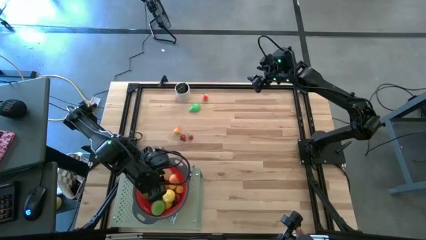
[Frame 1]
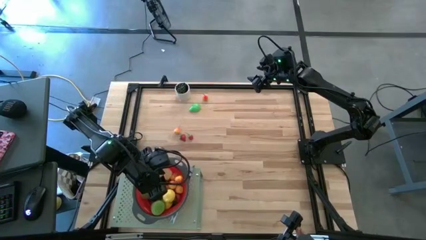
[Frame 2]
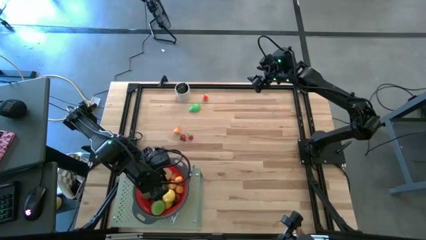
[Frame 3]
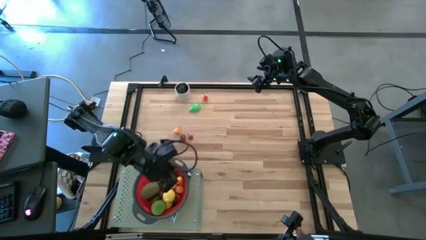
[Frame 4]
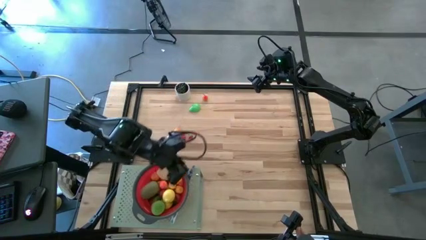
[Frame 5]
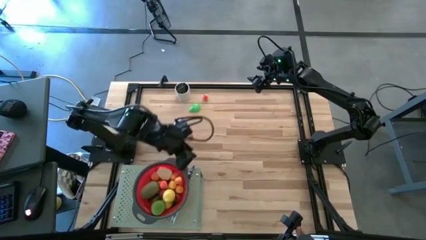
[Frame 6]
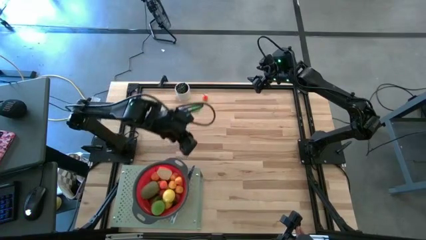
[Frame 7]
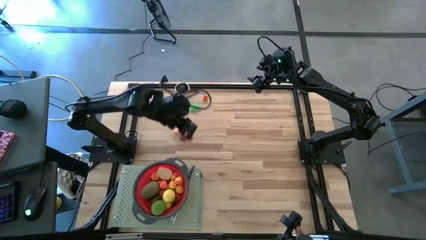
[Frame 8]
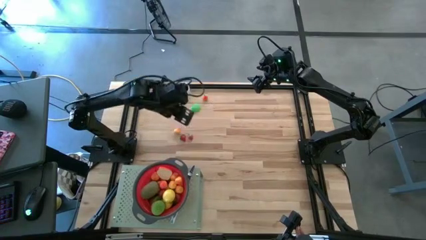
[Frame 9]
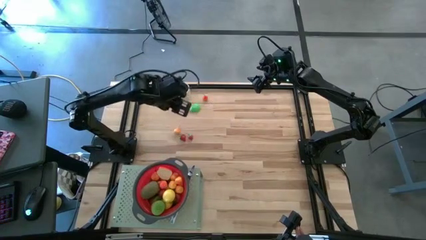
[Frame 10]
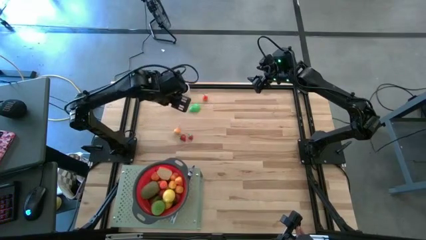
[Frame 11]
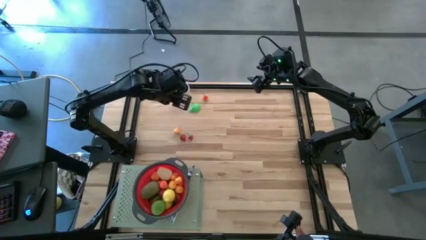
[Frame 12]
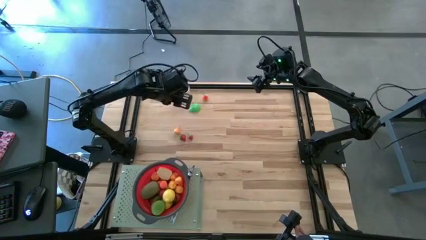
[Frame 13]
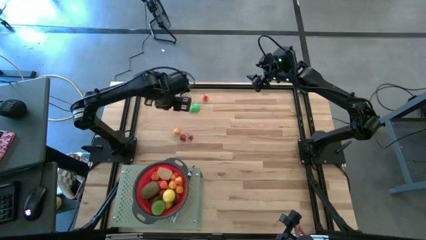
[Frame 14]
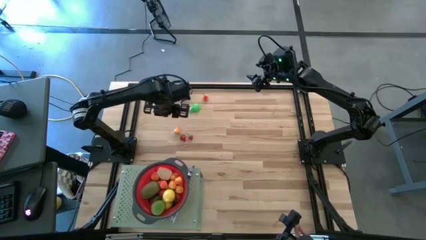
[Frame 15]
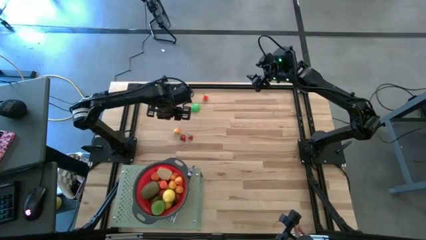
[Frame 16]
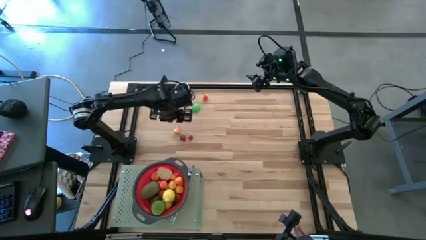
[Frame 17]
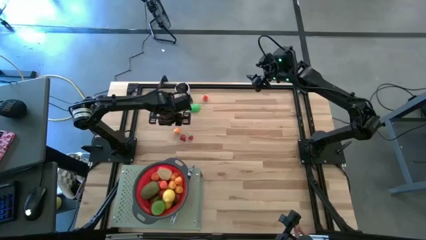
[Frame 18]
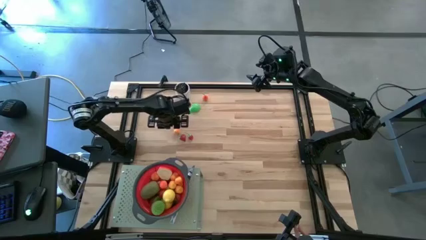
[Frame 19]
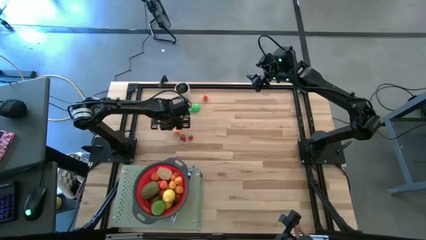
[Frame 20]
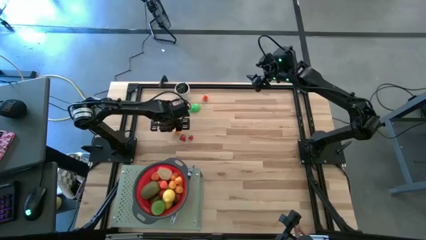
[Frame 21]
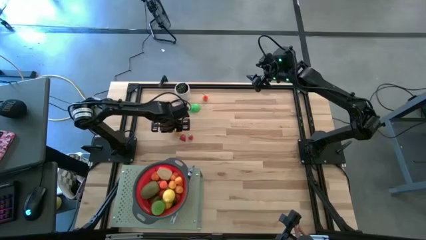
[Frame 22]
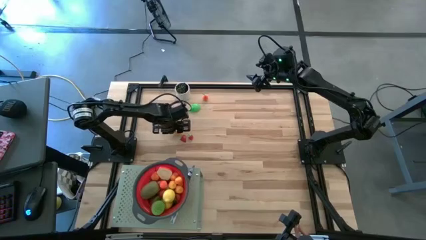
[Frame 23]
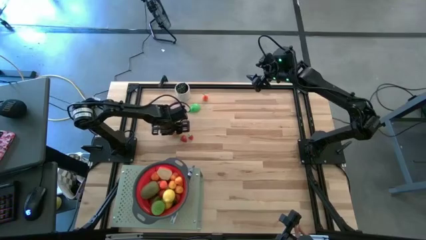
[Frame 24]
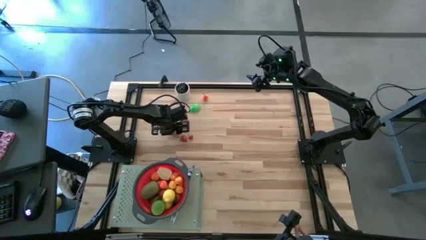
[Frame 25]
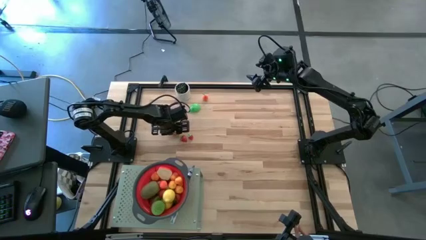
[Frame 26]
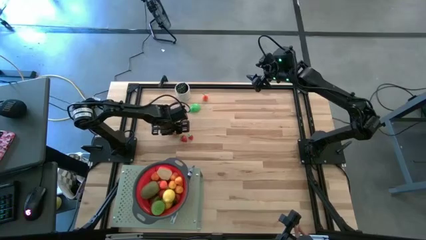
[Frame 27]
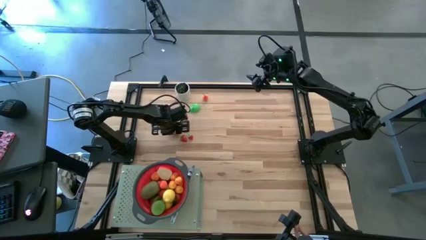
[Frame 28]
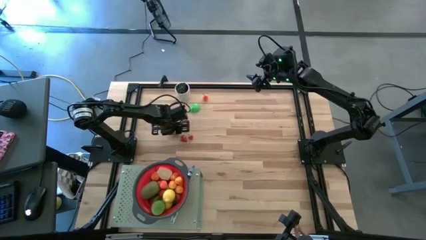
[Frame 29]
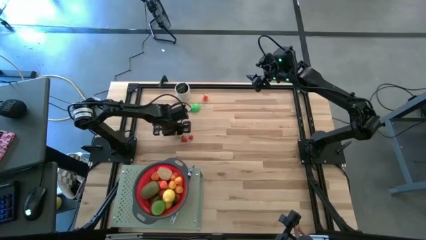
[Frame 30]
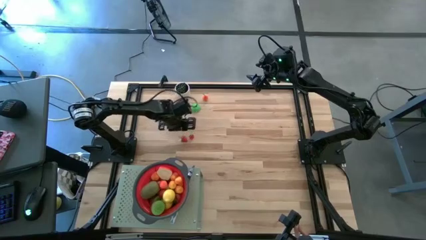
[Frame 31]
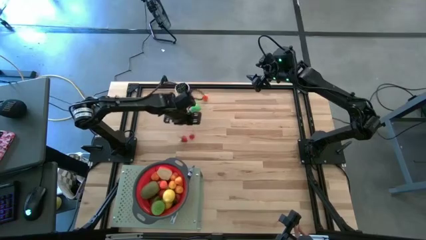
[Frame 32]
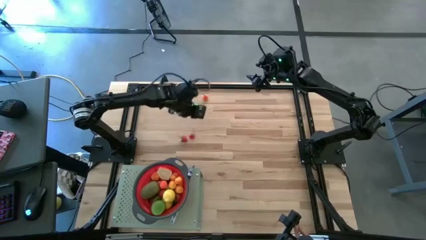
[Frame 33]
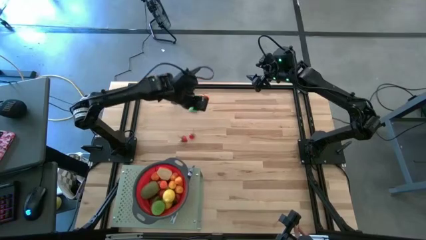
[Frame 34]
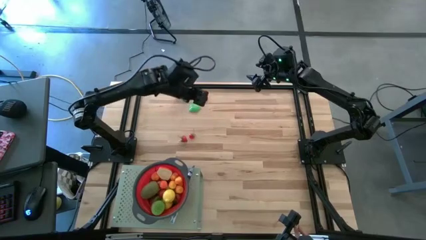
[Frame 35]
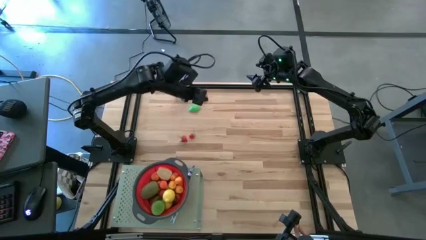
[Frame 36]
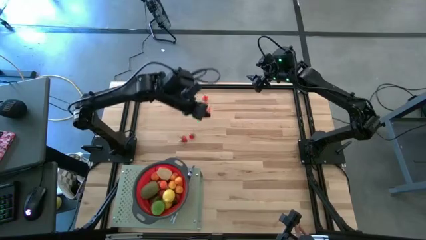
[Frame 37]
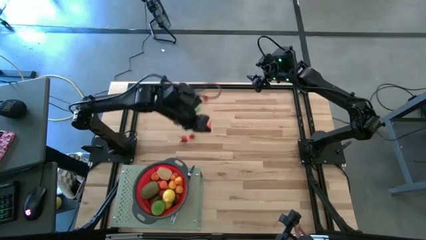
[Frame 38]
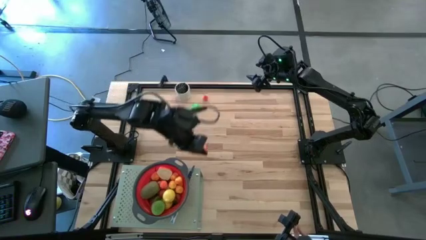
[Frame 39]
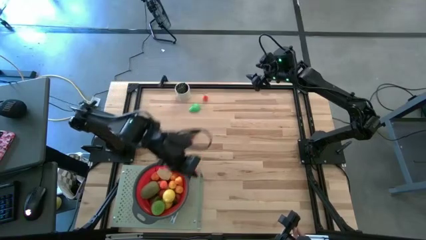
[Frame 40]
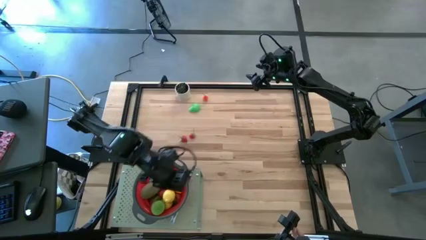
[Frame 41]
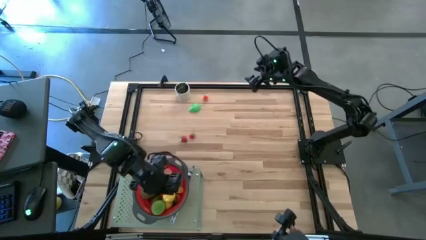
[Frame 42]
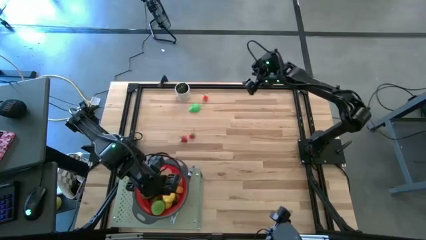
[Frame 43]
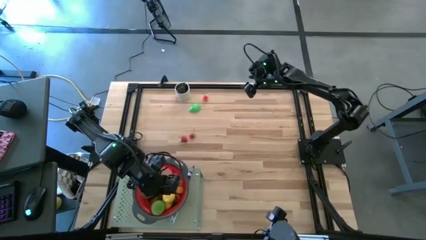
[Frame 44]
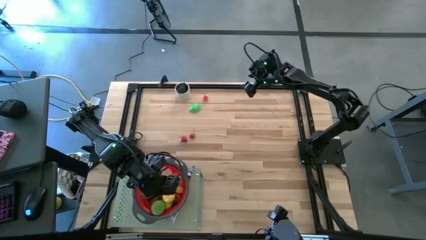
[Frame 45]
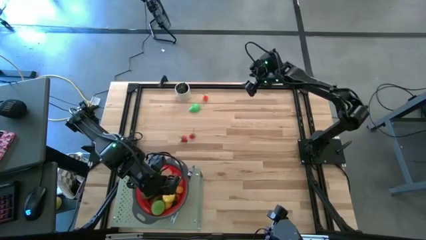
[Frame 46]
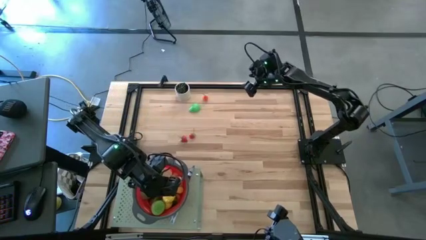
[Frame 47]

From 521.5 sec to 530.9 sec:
Task: Pick & Place Fruit
Put the pear into the red strainer bowl on the shelf

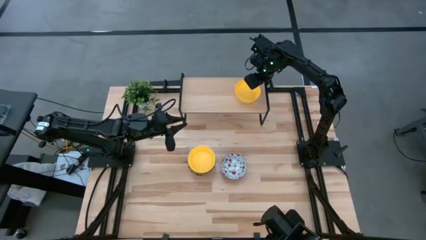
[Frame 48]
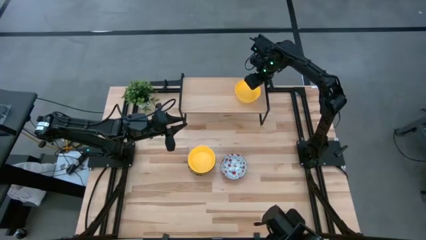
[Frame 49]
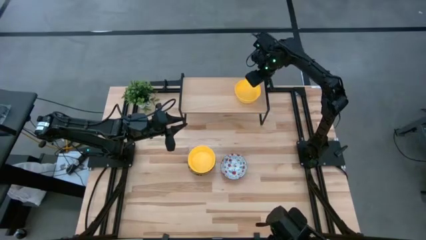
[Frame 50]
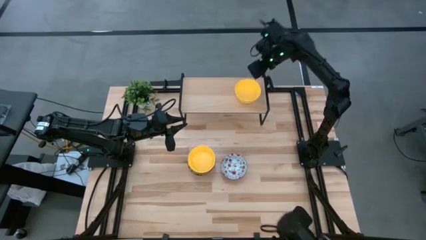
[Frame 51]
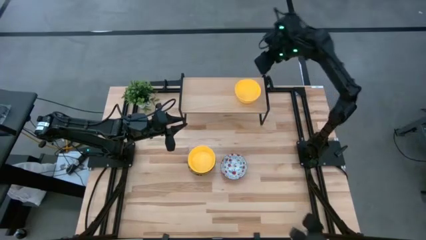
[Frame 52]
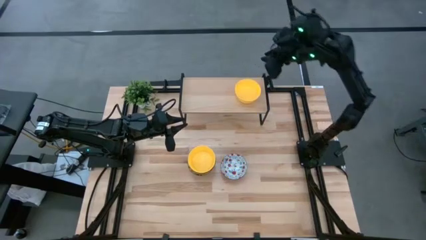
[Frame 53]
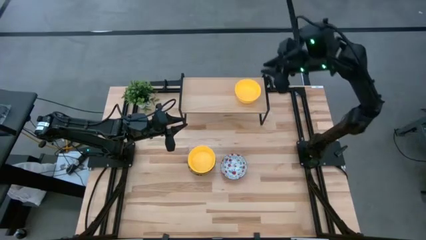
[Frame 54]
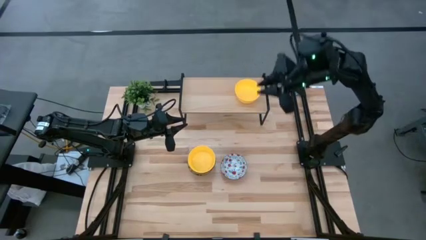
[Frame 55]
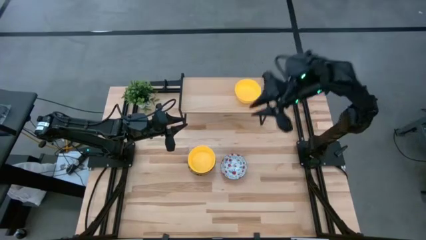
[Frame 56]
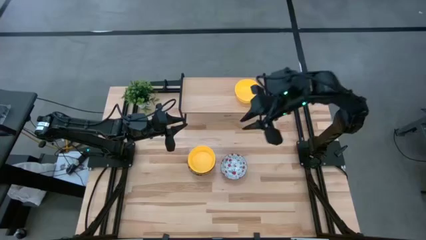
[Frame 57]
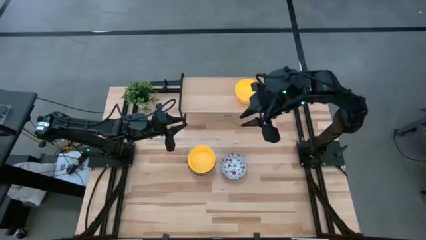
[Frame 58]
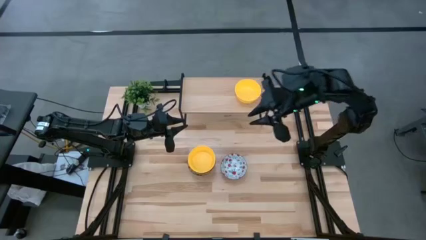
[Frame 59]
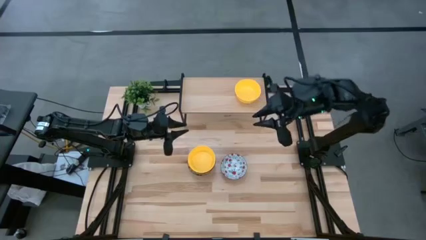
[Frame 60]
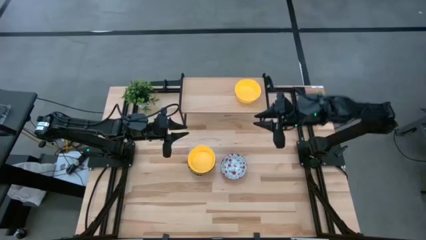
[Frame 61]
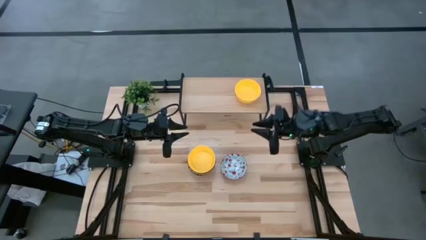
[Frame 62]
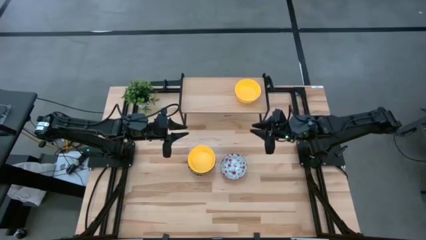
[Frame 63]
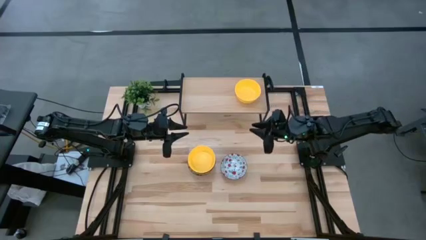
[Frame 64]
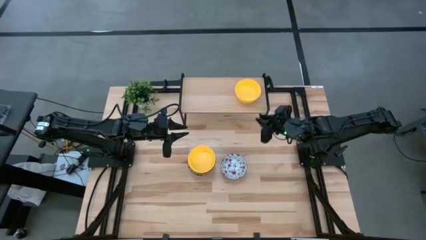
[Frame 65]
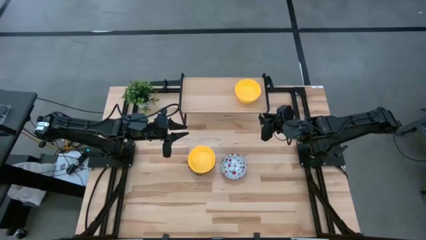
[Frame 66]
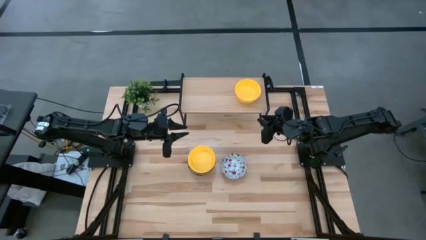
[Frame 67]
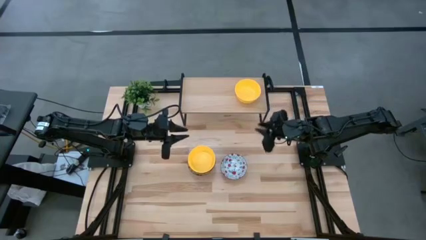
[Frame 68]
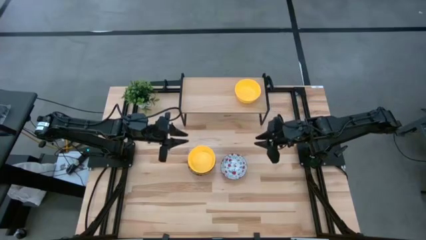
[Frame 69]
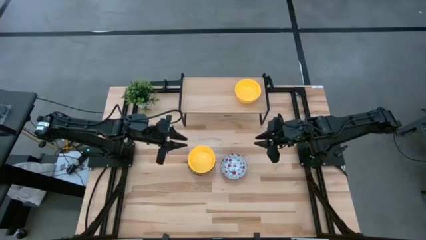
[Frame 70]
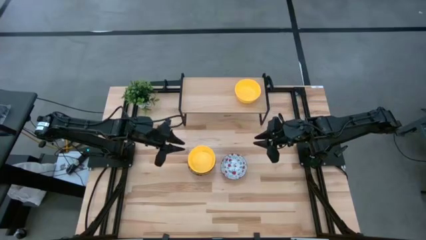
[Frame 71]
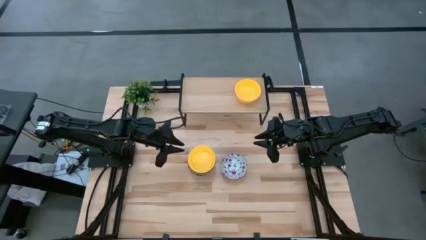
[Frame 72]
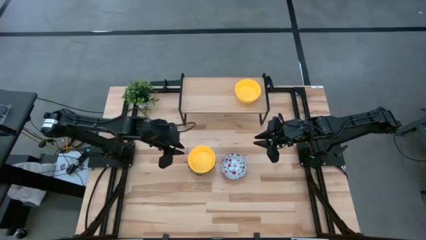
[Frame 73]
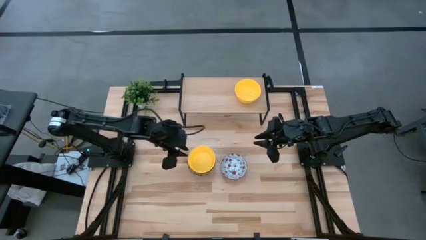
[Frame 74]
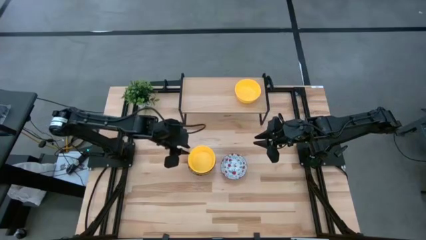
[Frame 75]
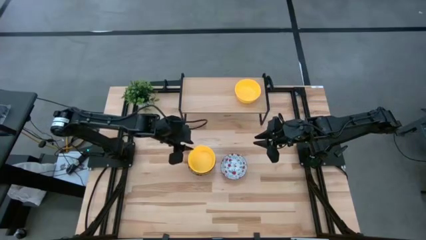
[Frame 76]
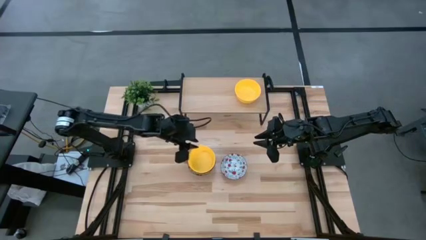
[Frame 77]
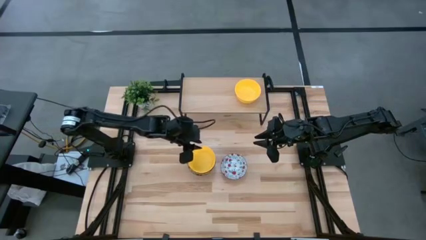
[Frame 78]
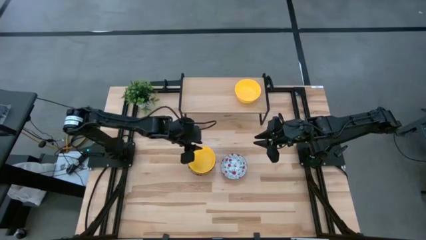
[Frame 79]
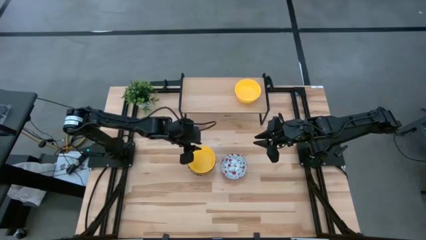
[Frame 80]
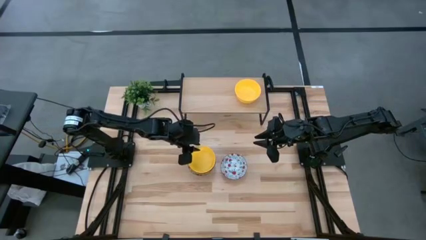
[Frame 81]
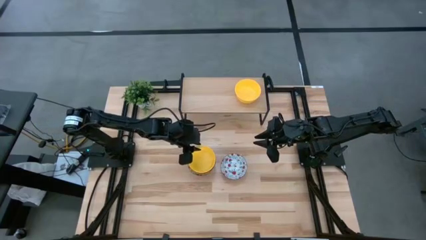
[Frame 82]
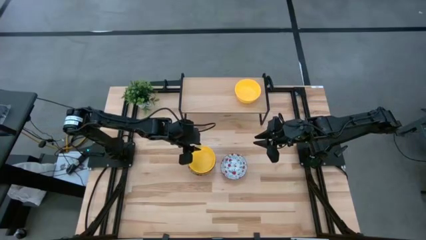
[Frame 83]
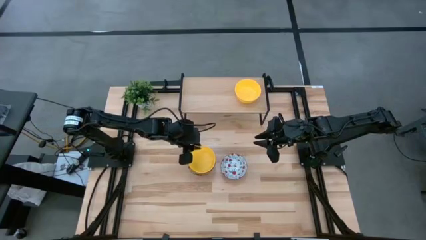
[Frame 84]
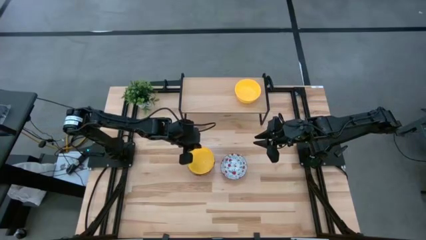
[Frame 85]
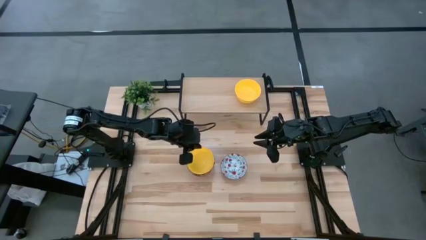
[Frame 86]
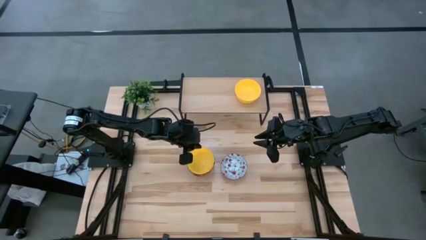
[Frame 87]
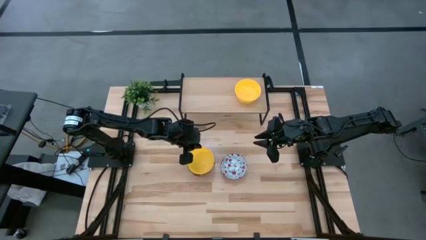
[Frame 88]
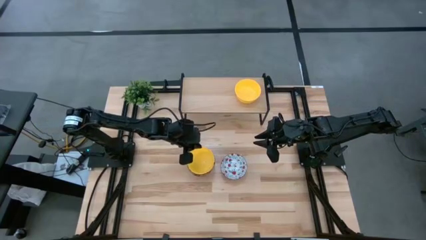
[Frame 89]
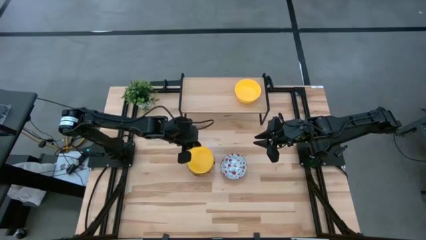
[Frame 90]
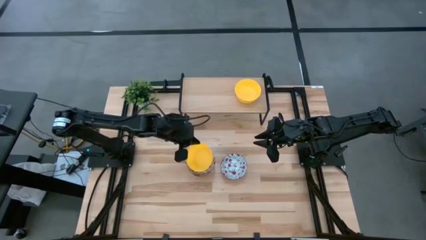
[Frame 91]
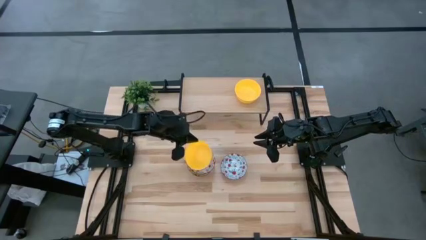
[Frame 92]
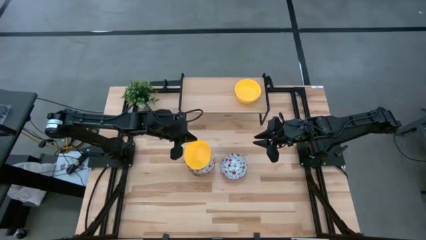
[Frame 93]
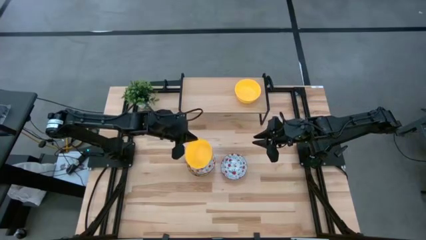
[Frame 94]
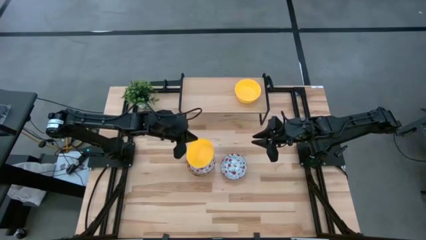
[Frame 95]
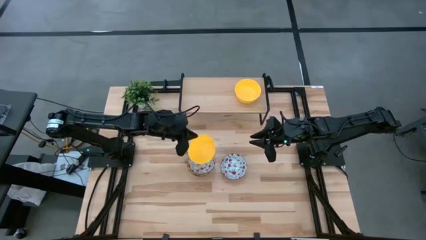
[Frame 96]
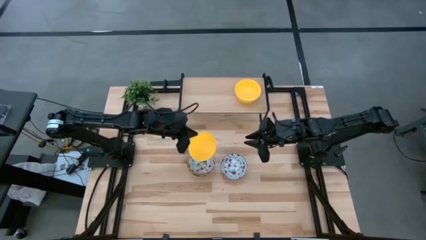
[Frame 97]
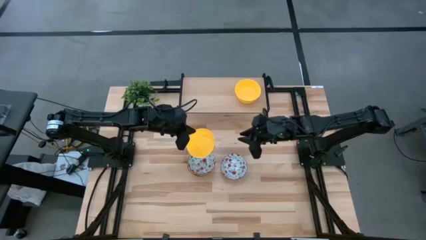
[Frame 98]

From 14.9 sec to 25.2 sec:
Task: Pick & Place Mini bowls
Stack the top left yellow bowl on the other yellow bowl on the shelf
